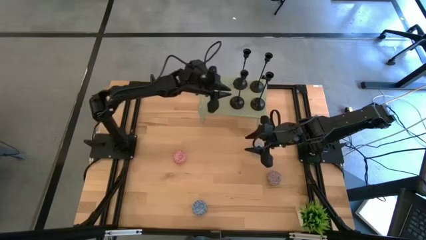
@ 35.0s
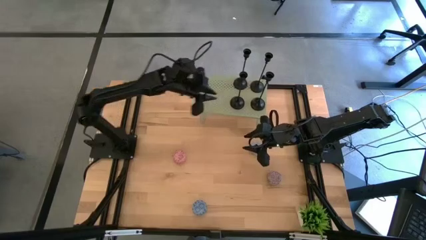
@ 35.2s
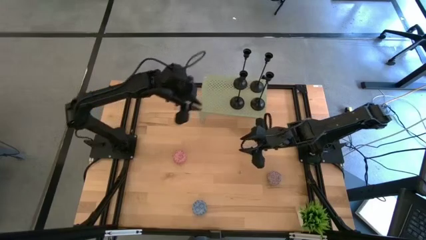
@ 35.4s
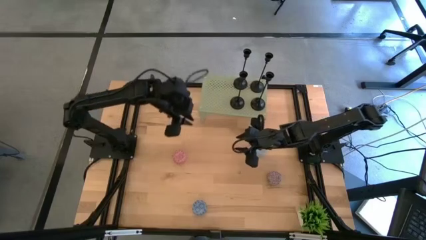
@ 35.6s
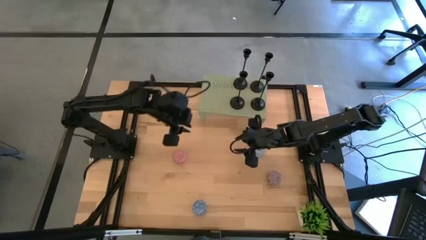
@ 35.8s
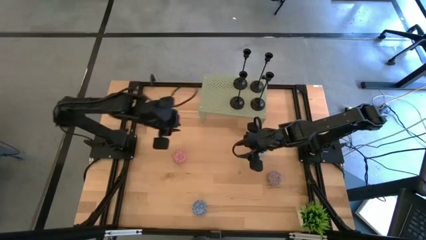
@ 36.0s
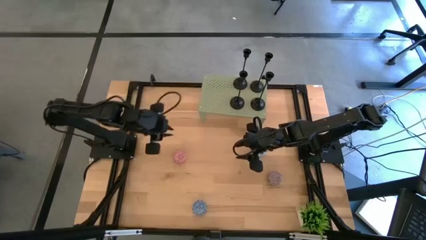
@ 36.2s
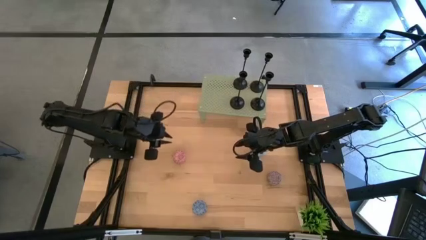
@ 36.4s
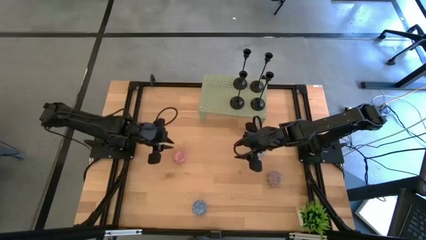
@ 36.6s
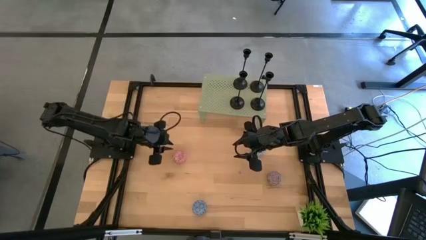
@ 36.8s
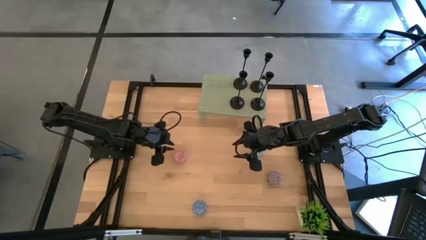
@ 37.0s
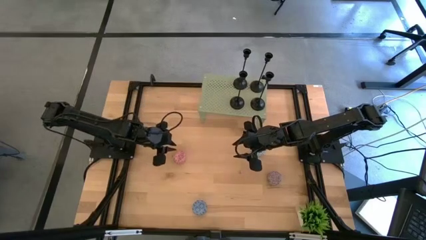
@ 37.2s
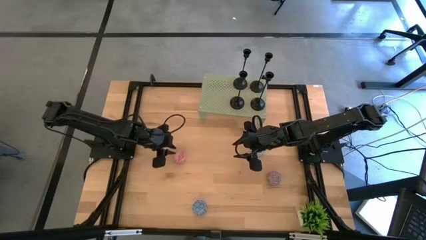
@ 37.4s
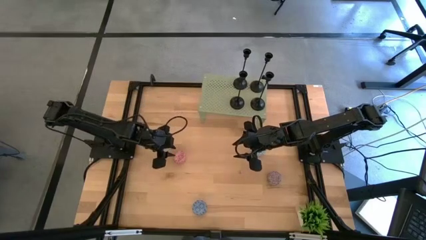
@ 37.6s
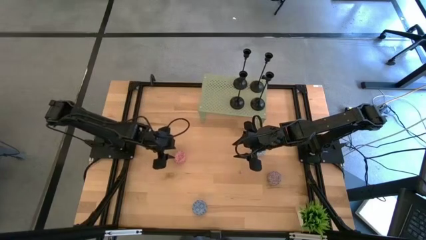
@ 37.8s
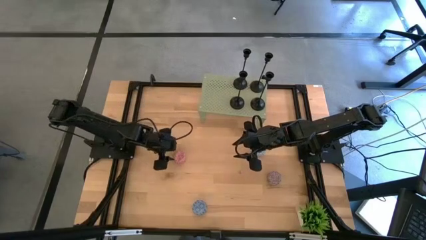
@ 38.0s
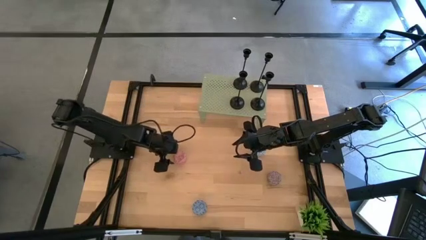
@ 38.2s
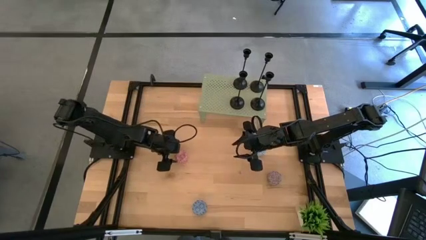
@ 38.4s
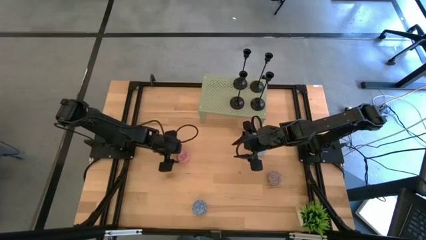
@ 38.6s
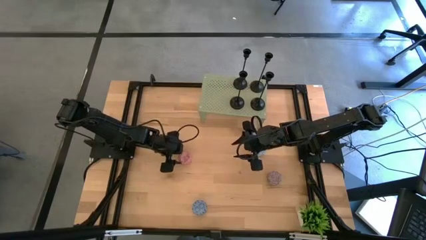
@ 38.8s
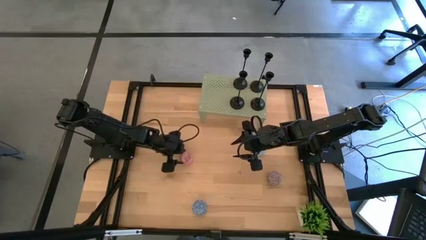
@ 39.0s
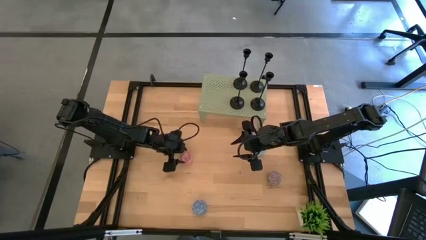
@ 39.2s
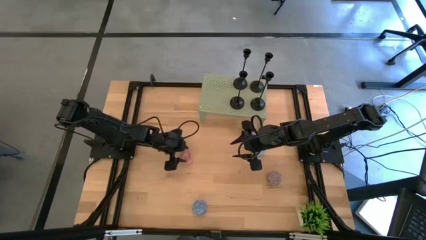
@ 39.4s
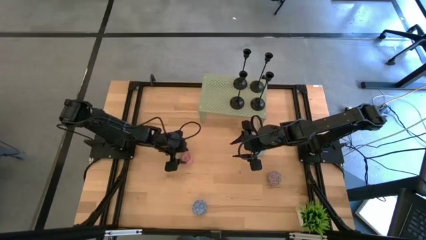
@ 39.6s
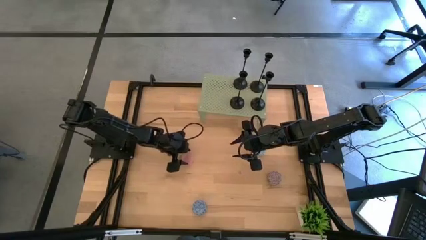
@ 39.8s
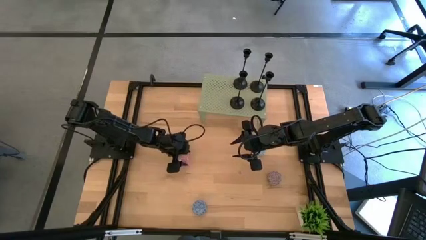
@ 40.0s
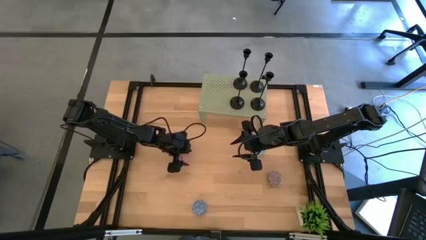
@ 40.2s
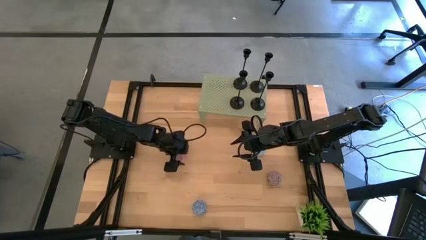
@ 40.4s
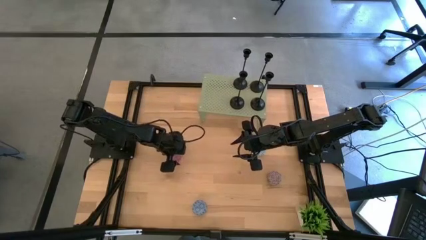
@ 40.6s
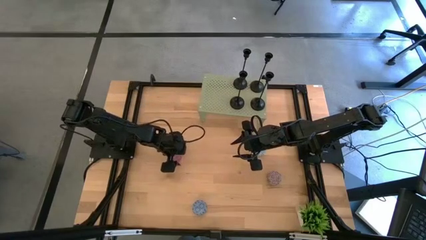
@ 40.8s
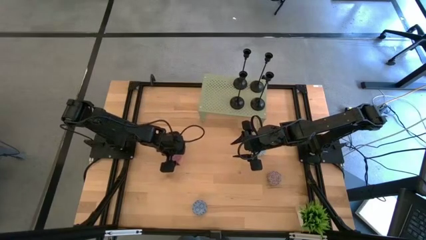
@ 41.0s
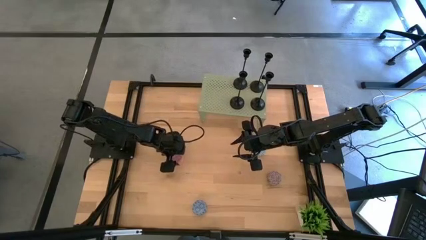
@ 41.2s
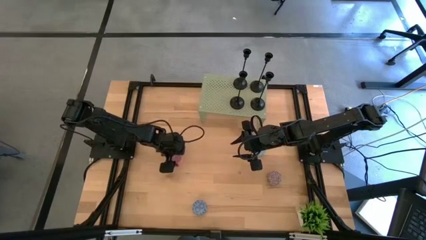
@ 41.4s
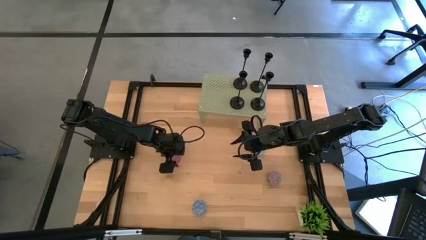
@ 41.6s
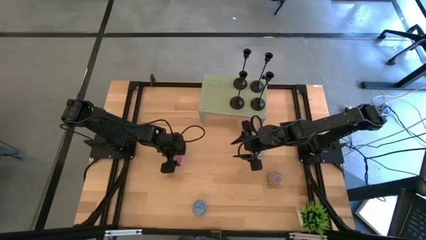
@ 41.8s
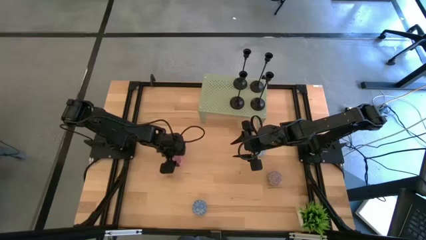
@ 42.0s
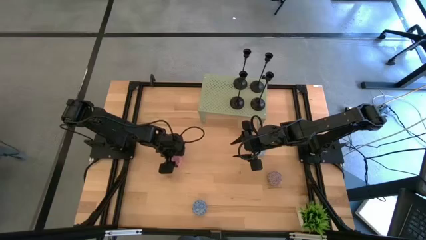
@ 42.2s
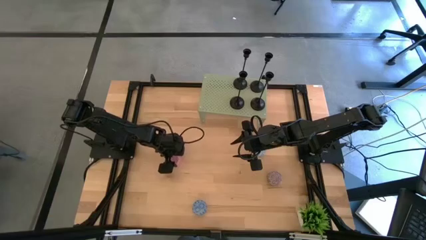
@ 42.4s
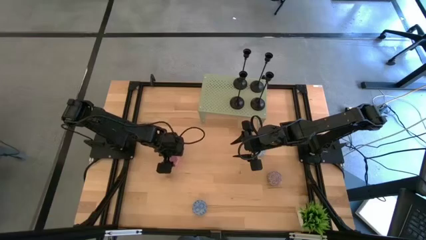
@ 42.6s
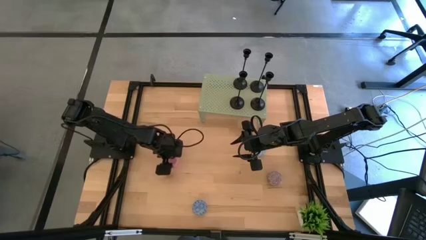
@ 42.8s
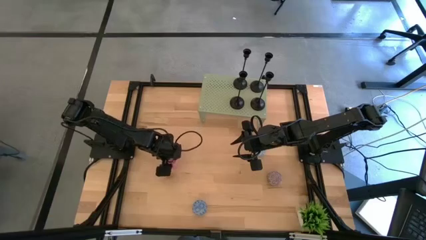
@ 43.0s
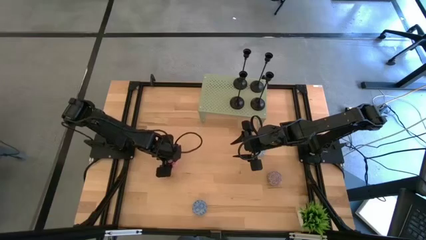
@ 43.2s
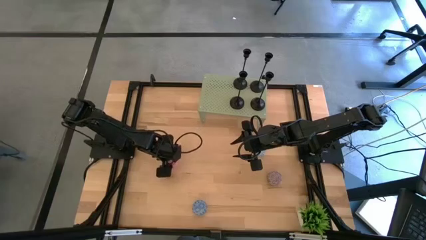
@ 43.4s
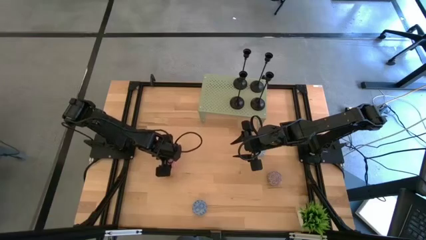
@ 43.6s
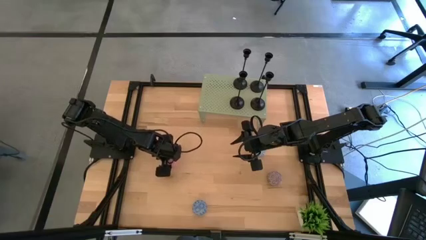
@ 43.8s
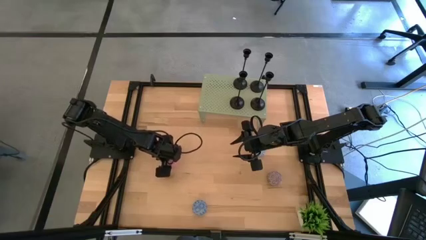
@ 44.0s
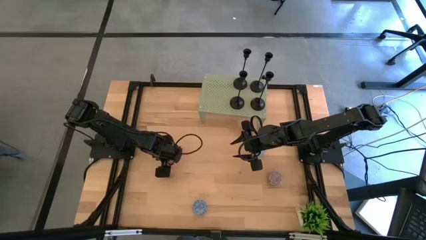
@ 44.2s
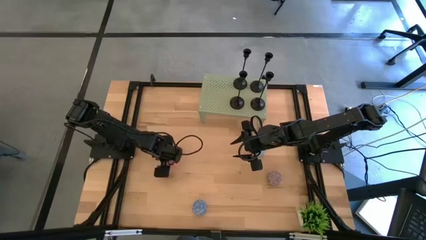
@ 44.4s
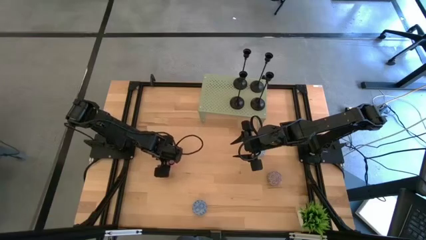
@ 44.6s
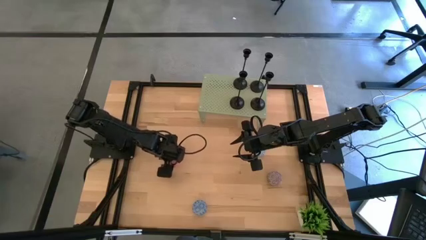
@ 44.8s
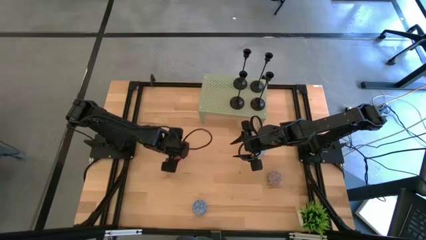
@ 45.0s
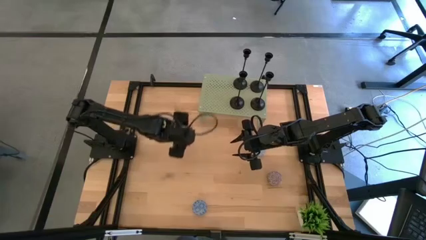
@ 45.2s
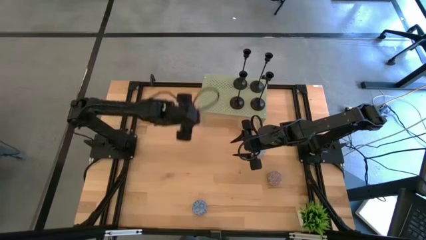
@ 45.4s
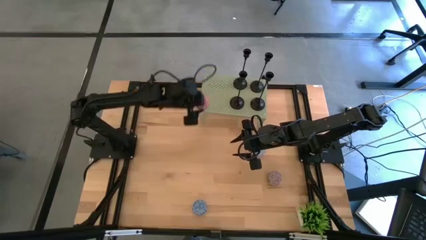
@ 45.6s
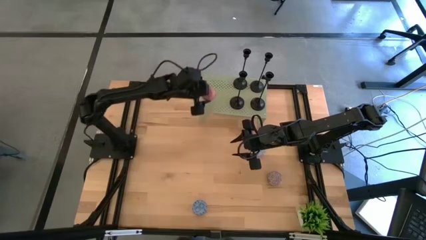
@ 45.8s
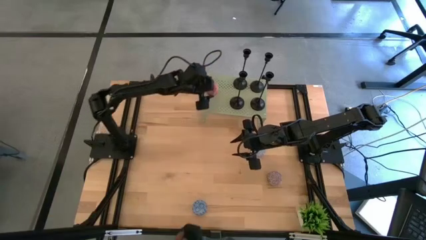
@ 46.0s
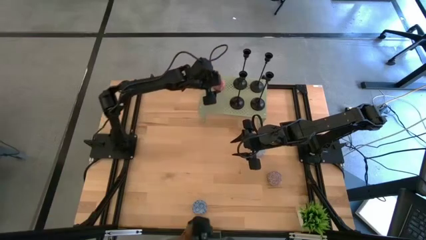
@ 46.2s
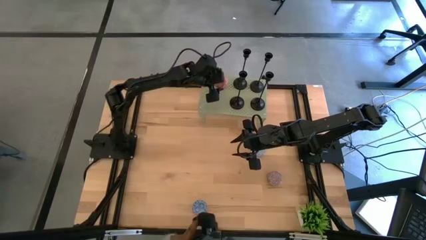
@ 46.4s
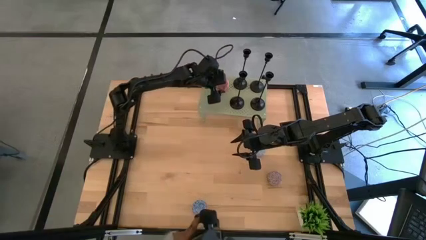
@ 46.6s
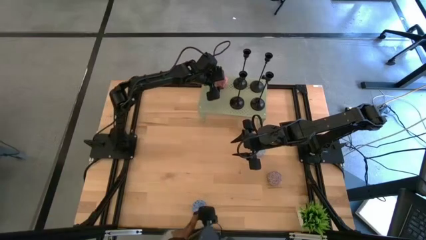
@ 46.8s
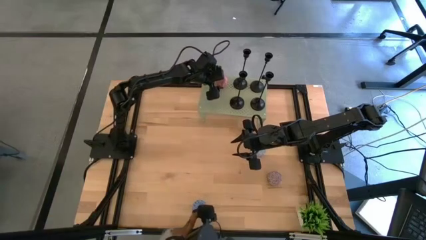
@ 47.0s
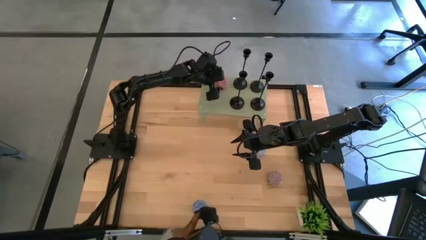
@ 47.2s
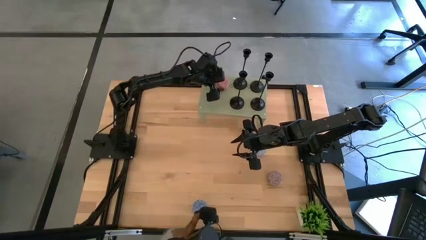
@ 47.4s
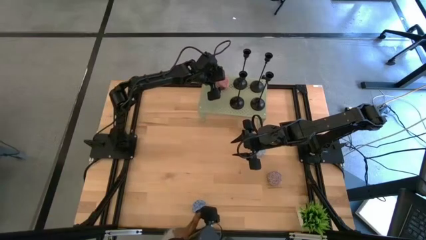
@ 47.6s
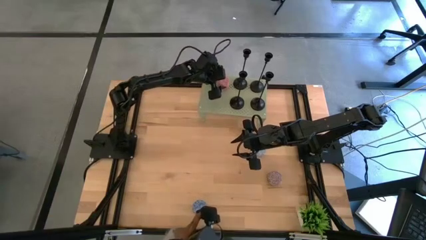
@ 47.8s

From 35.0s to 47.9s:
Task: Pick & Place candle stick holders
Put the pink scented candle on the shelf
